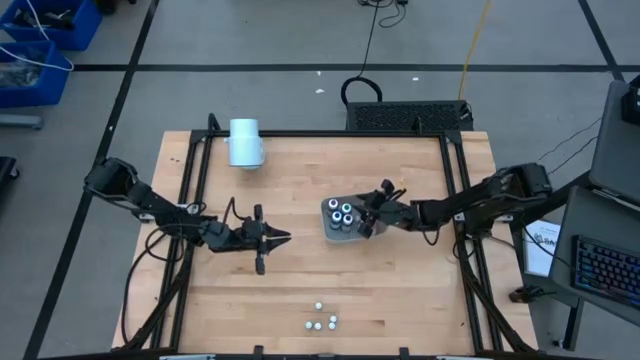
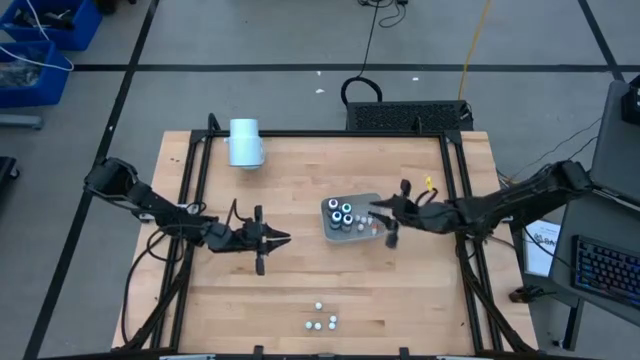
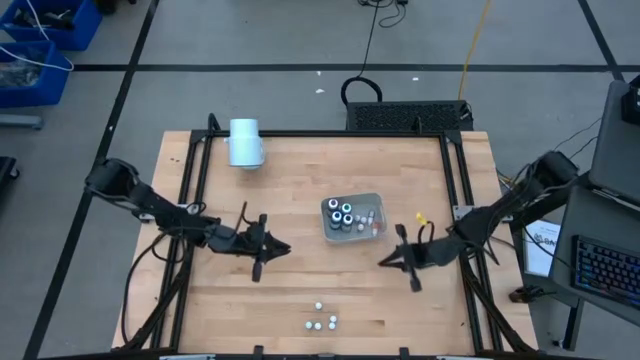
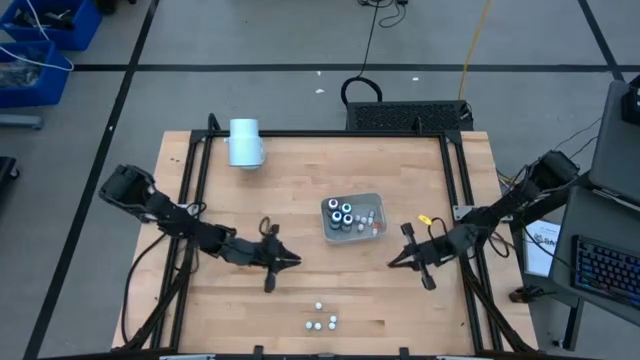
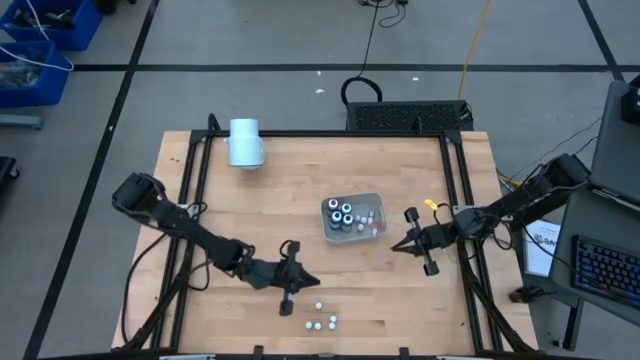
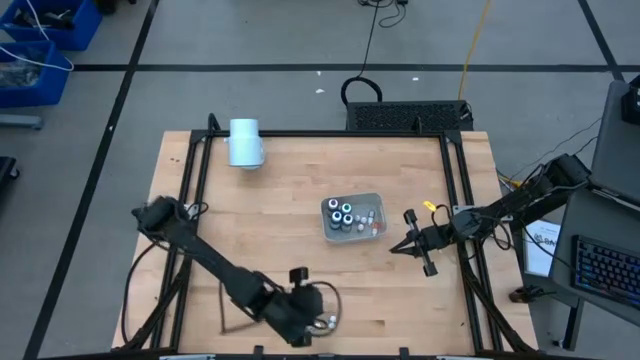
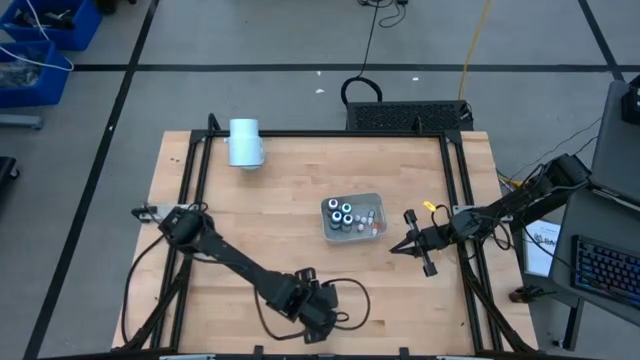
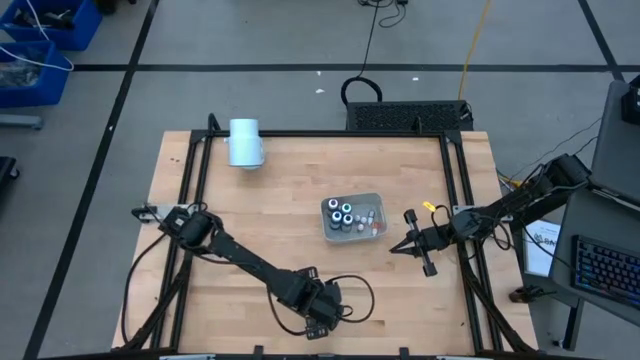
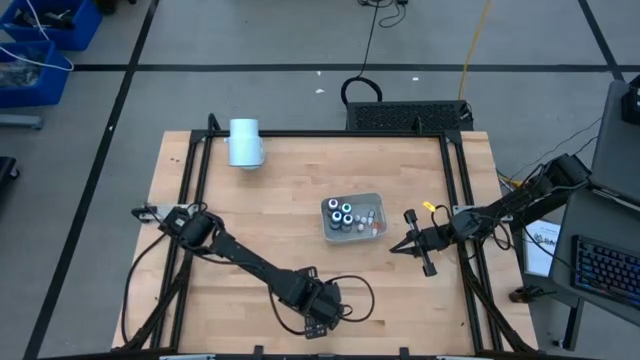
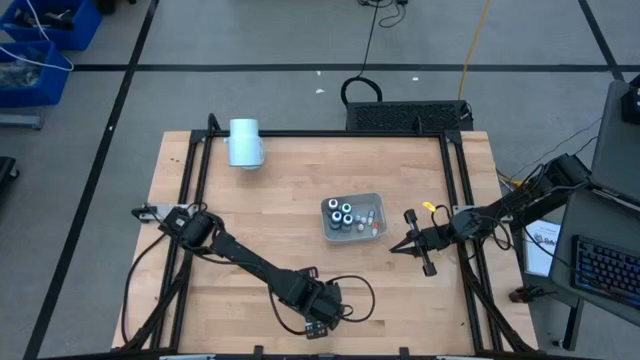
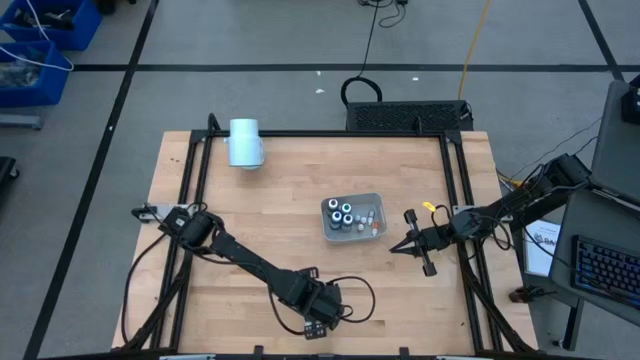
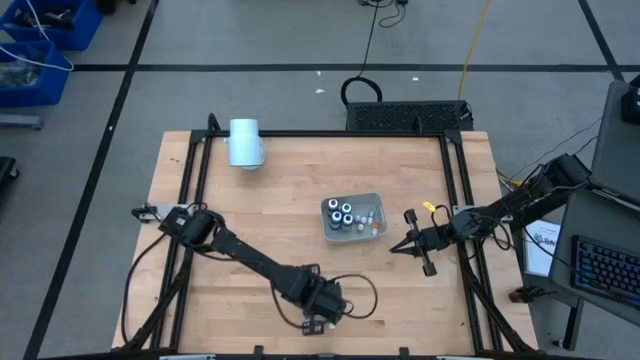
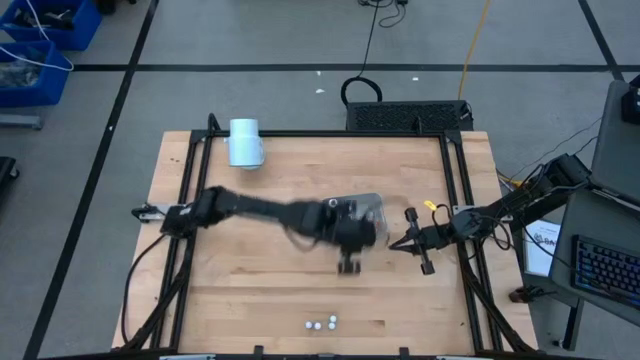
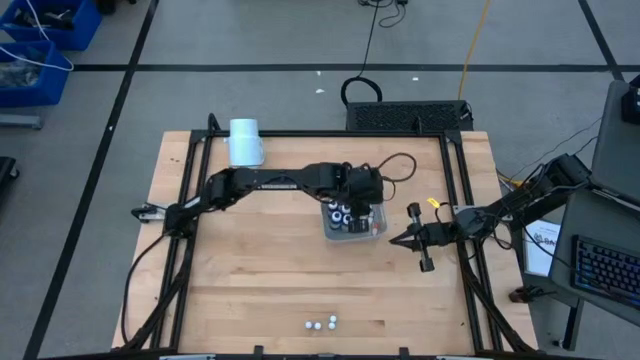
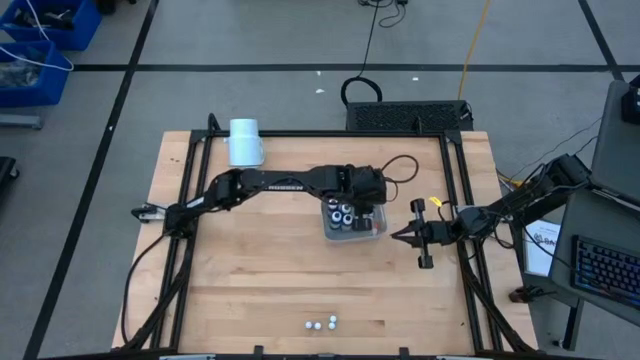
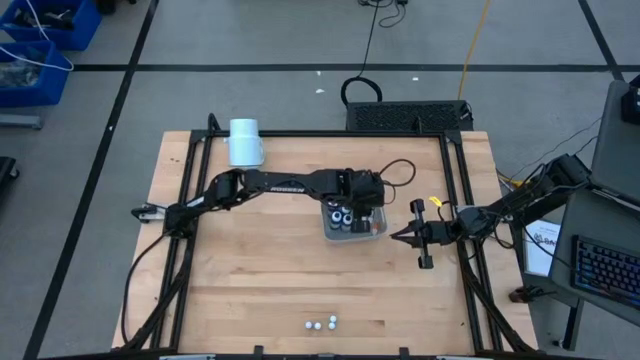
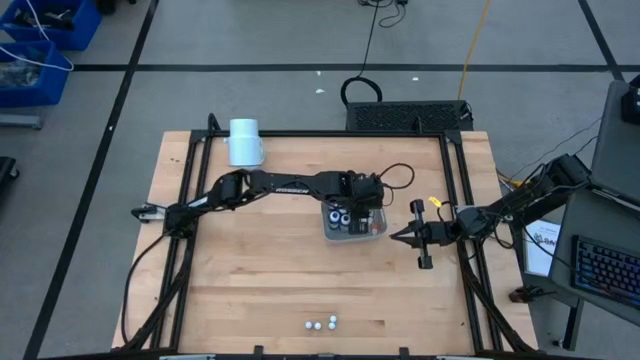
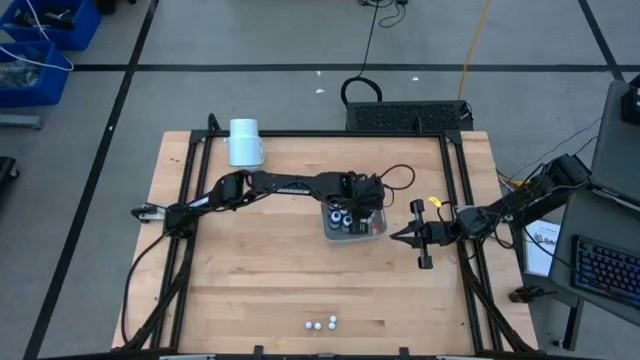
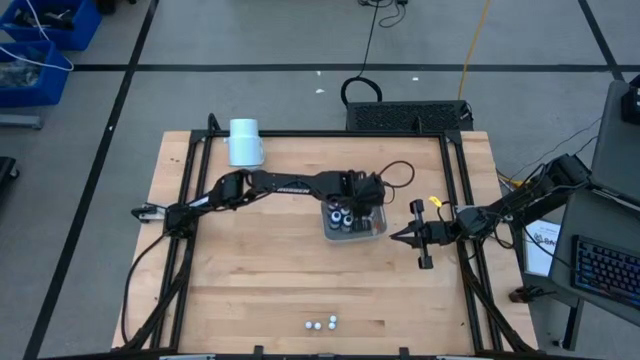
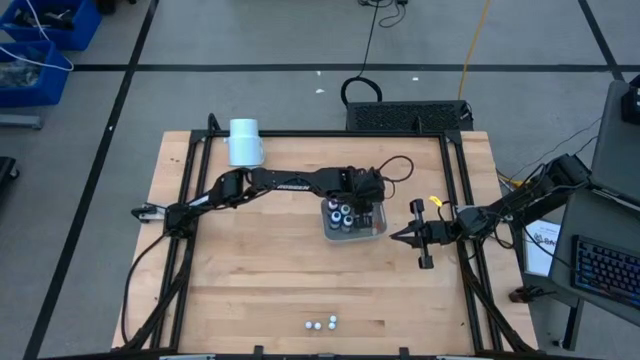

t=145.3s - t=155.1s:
Task: Pick & Place food coloring
Put the small black food coloring bottle into the gray bin

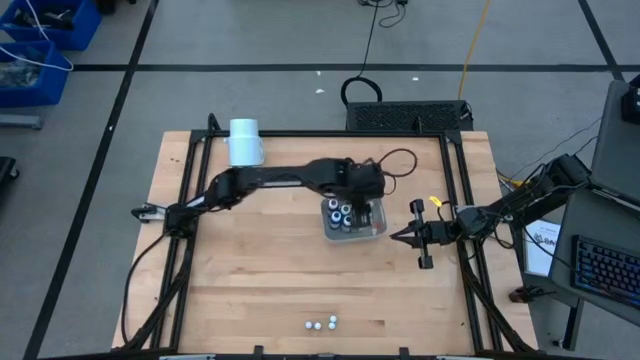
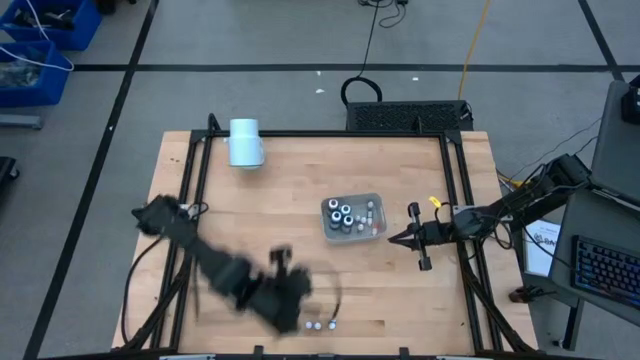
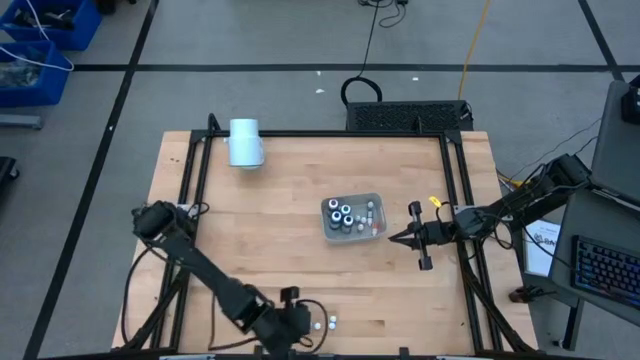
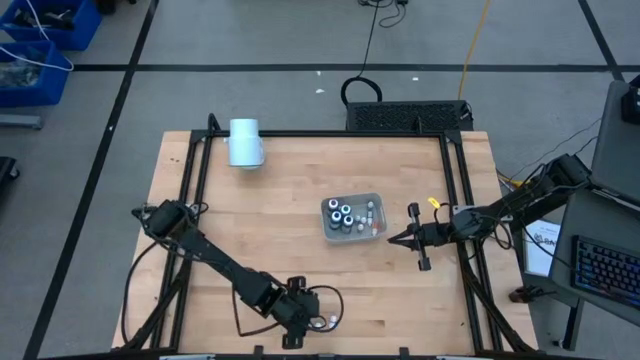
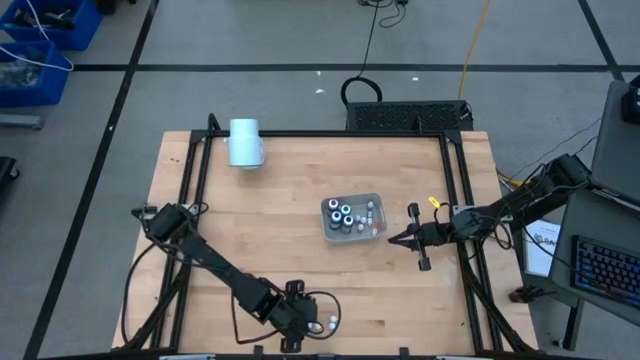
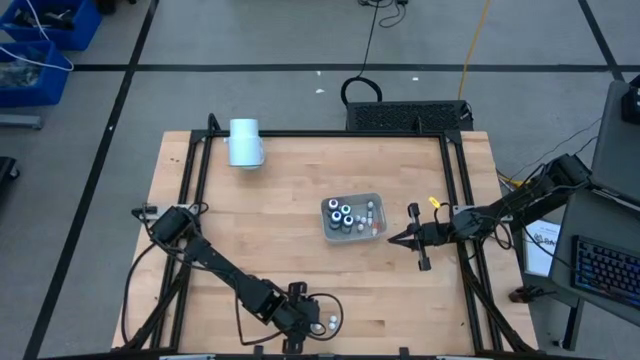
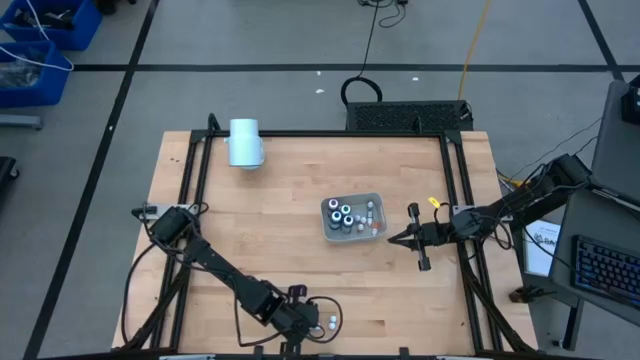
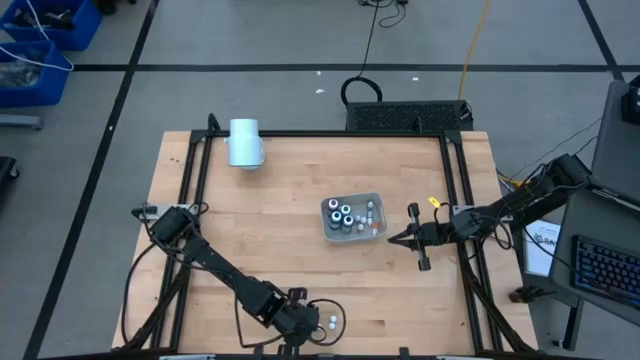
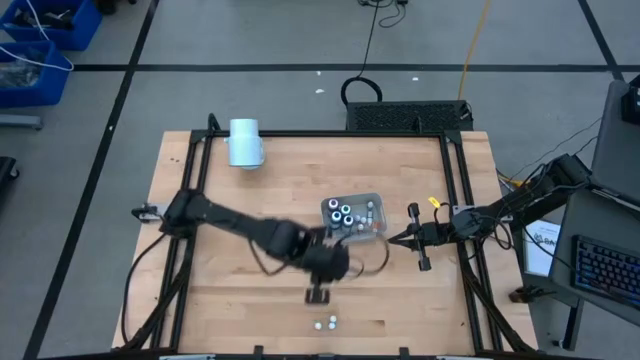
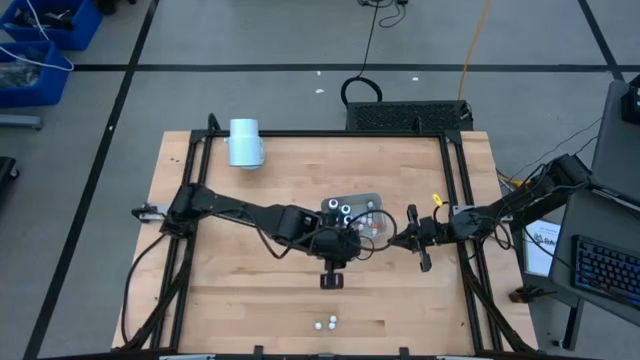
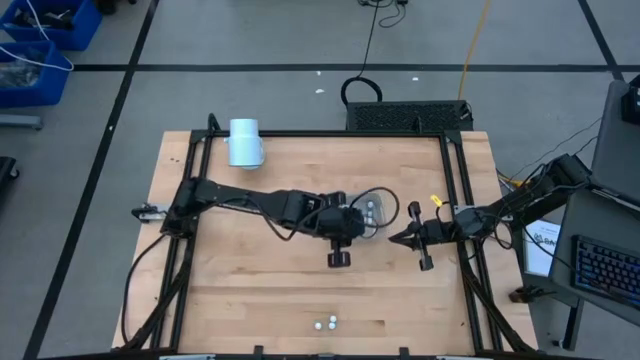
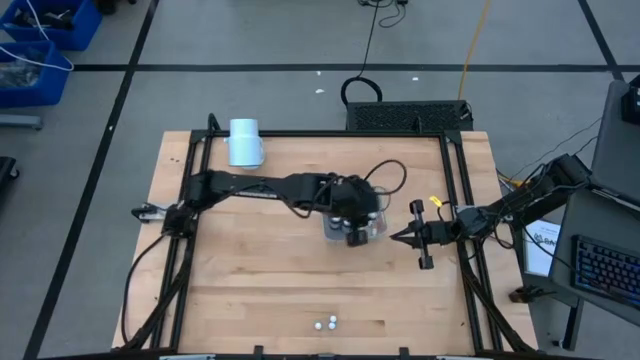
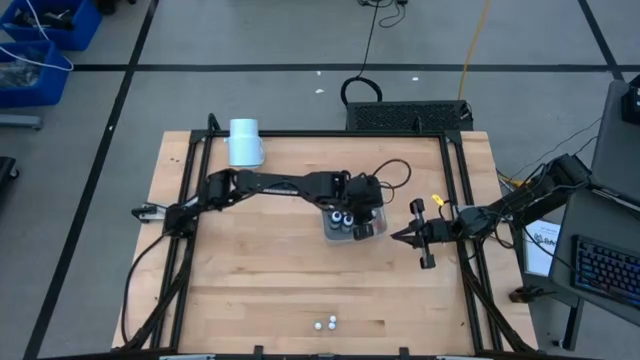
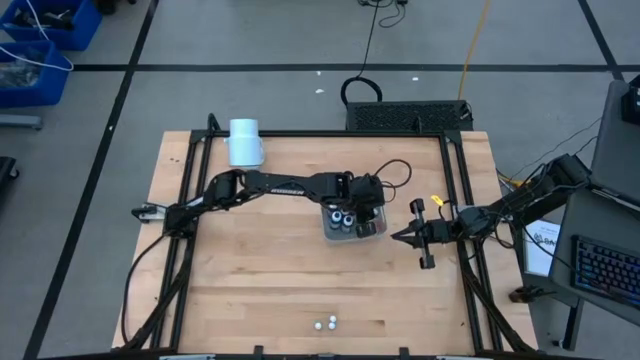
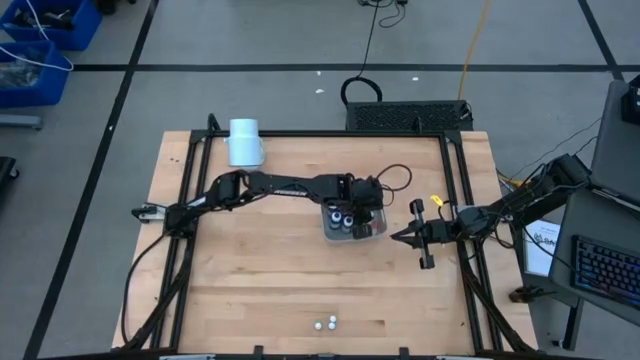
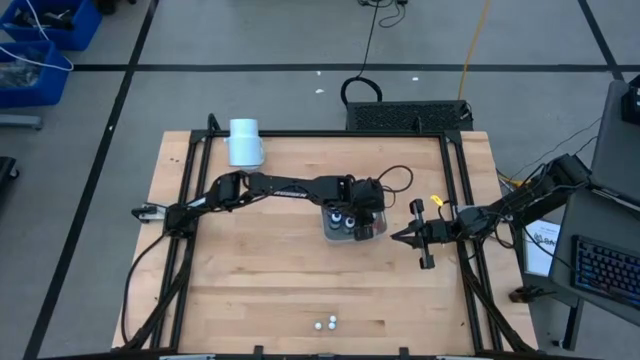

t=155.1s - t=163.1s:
Put the small blue food coloring bottle into the gray bin

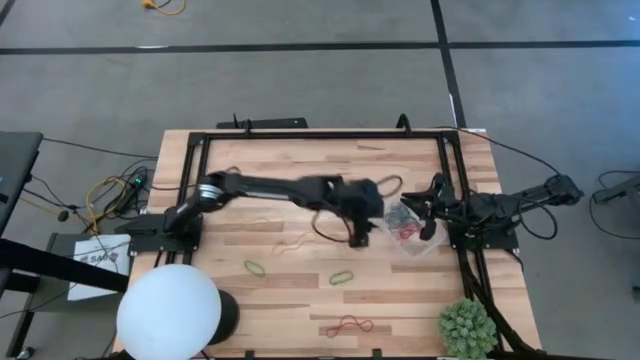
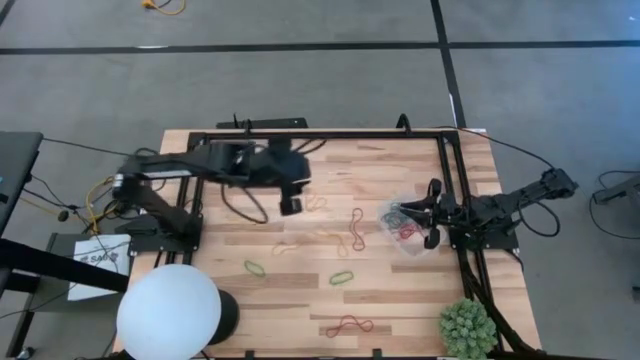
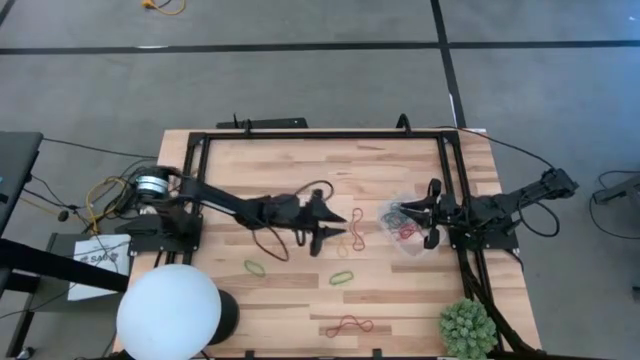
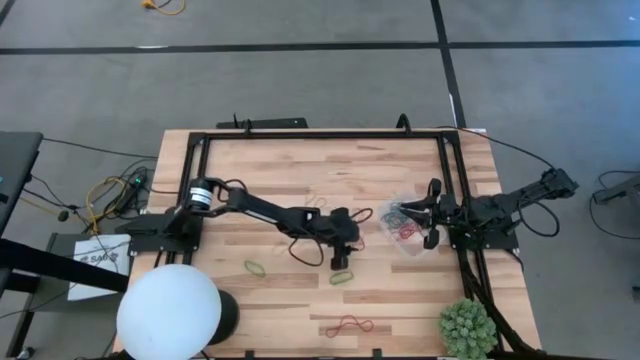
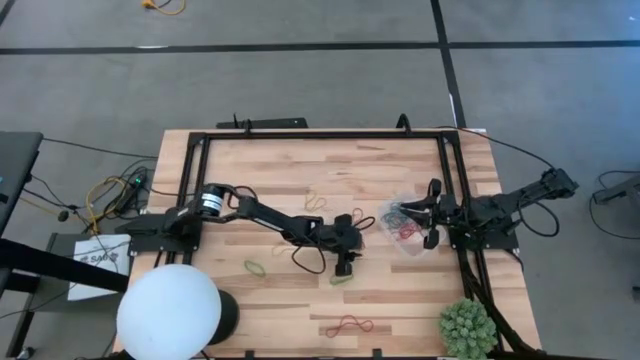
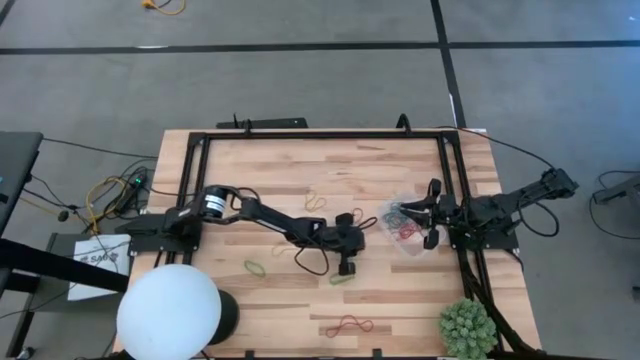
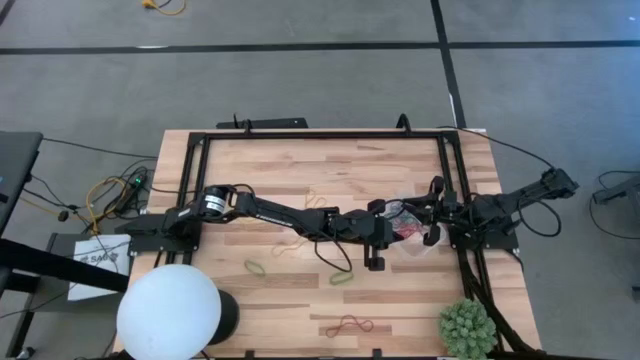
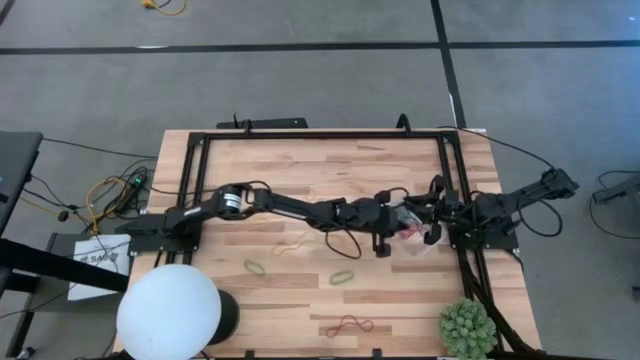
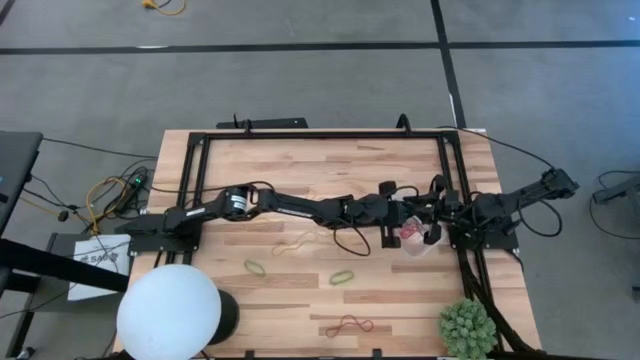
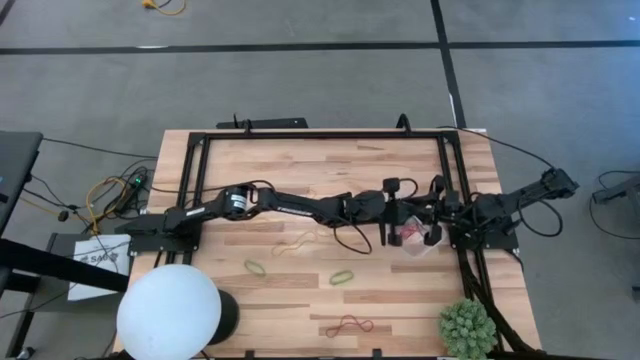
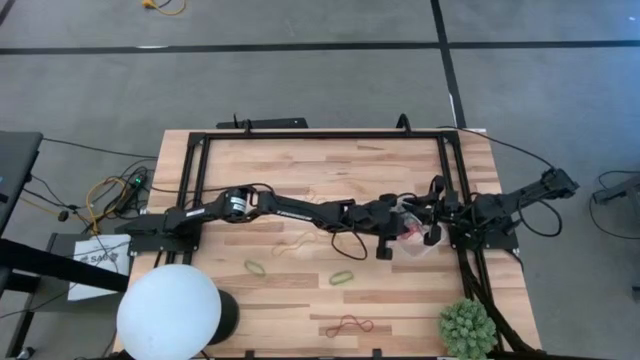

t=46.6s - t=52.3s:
Task: Pick and place items into bin
Put the red rubber band into the transparent bin
